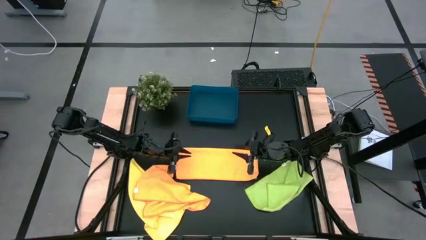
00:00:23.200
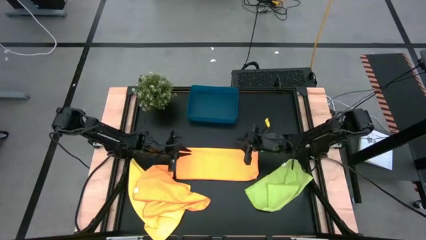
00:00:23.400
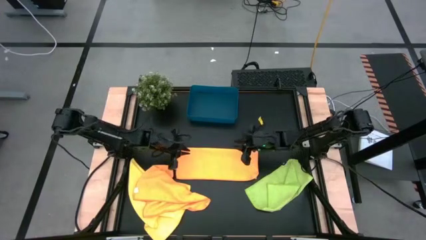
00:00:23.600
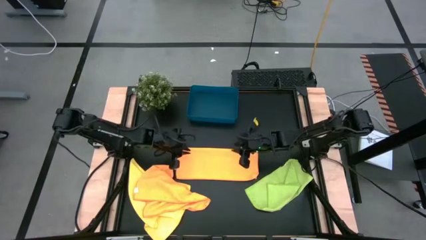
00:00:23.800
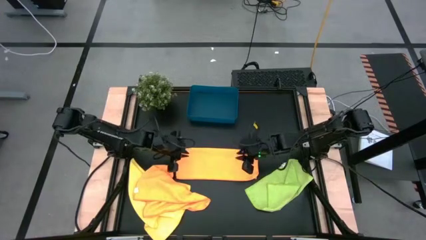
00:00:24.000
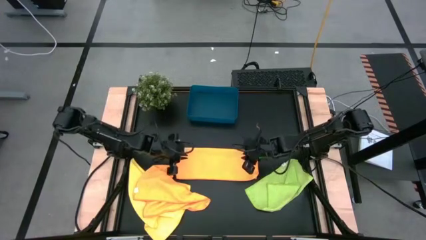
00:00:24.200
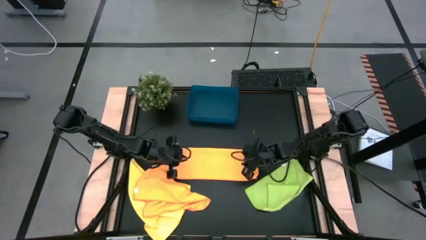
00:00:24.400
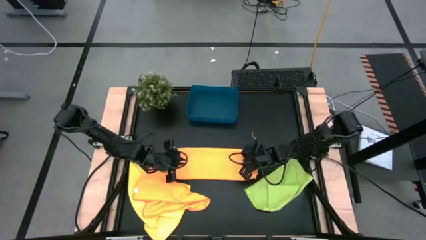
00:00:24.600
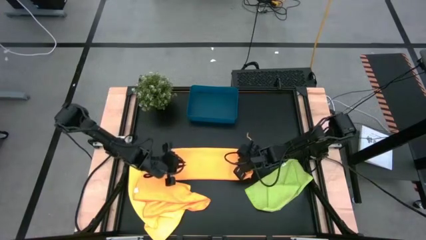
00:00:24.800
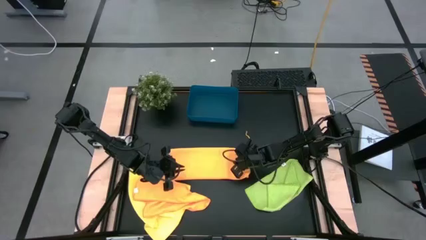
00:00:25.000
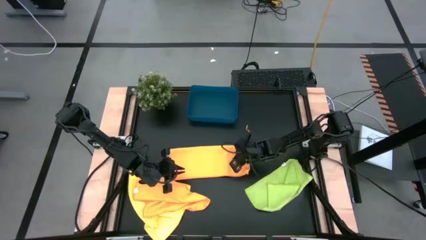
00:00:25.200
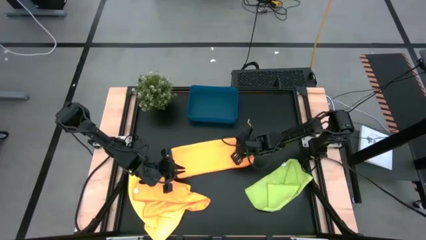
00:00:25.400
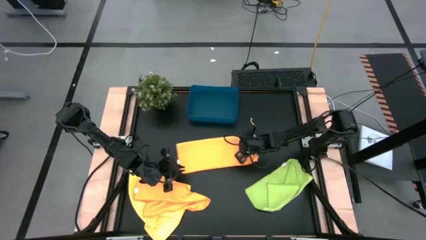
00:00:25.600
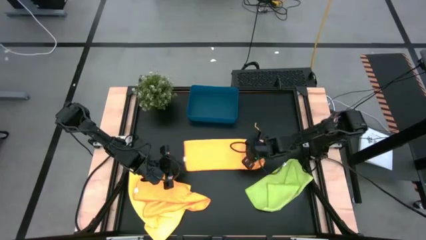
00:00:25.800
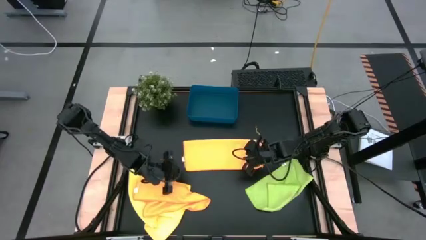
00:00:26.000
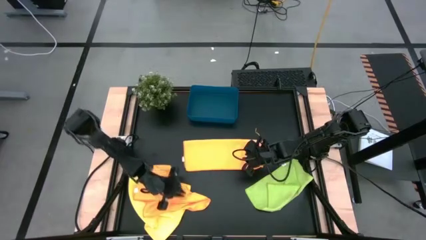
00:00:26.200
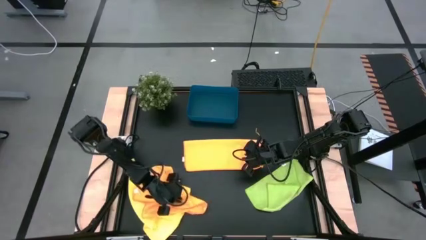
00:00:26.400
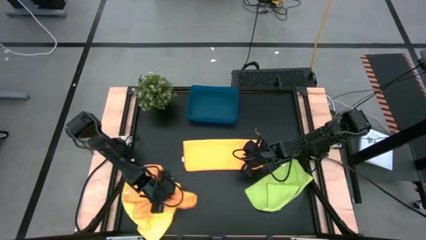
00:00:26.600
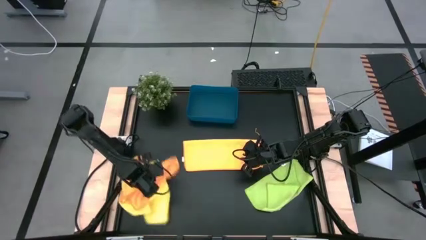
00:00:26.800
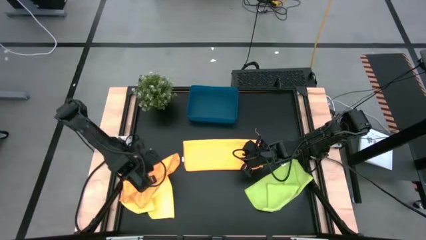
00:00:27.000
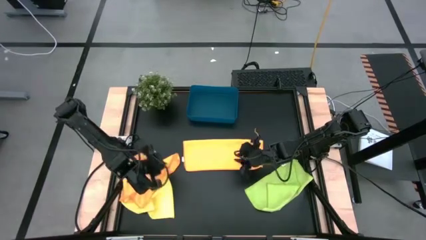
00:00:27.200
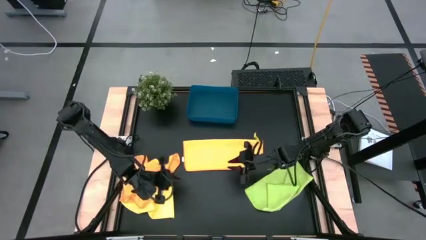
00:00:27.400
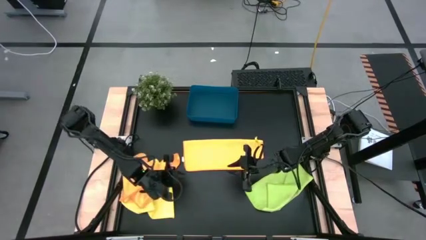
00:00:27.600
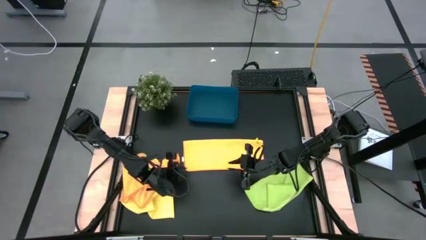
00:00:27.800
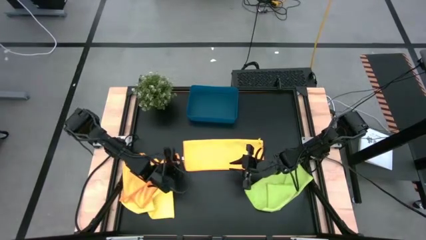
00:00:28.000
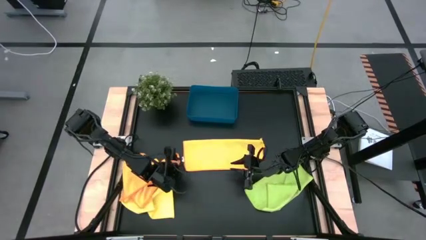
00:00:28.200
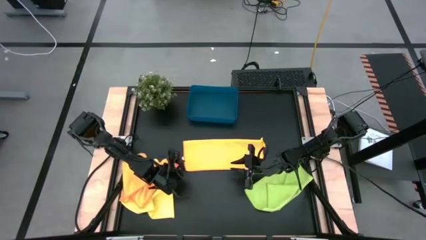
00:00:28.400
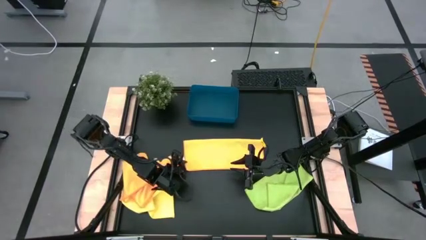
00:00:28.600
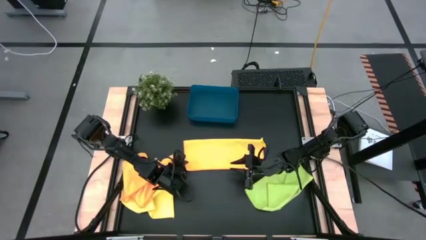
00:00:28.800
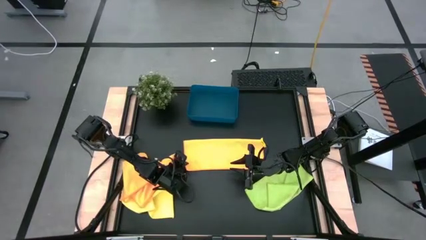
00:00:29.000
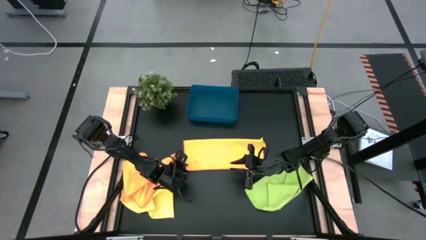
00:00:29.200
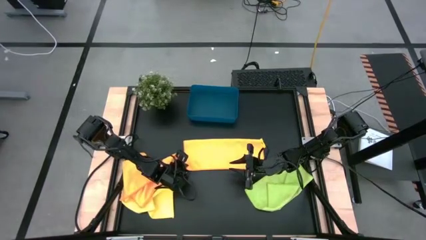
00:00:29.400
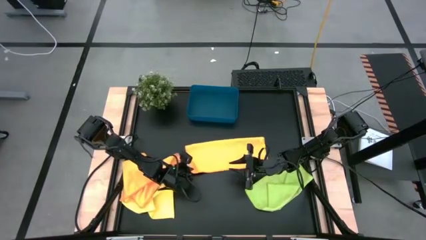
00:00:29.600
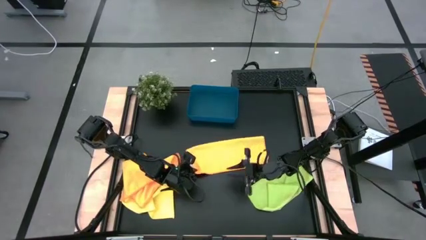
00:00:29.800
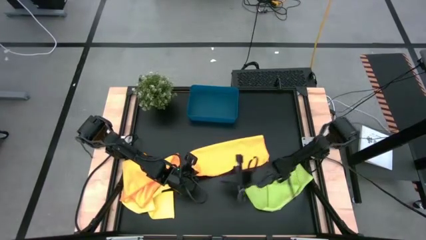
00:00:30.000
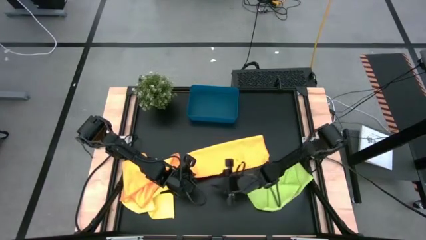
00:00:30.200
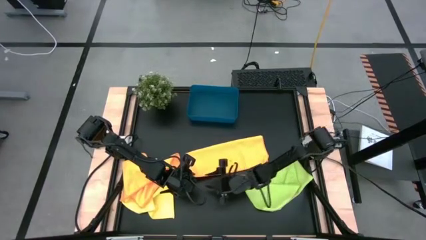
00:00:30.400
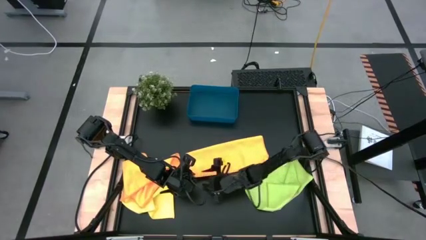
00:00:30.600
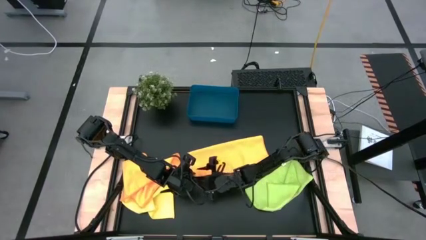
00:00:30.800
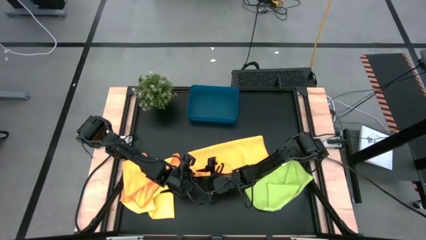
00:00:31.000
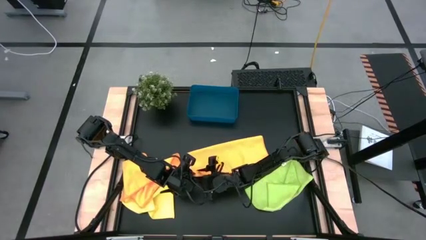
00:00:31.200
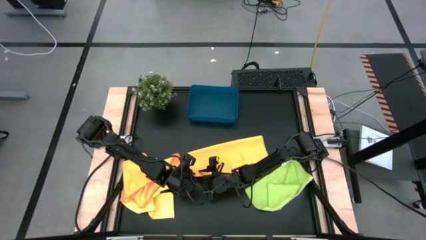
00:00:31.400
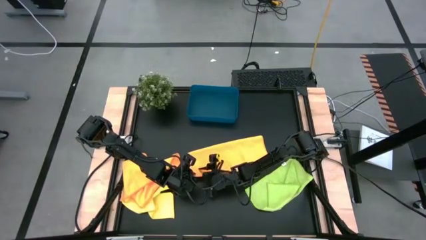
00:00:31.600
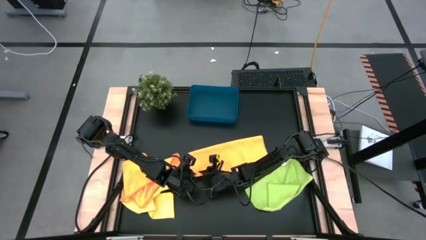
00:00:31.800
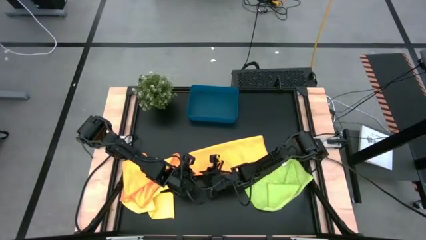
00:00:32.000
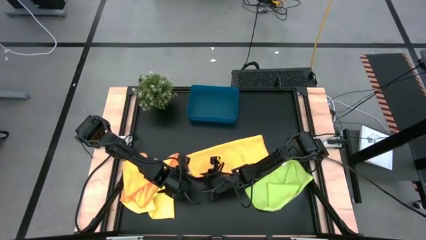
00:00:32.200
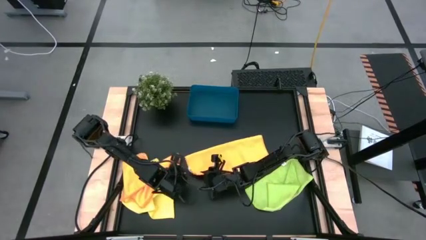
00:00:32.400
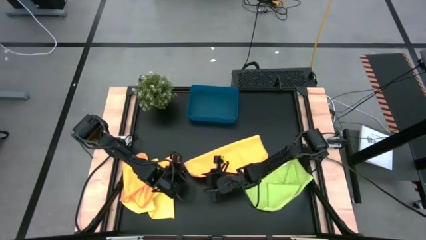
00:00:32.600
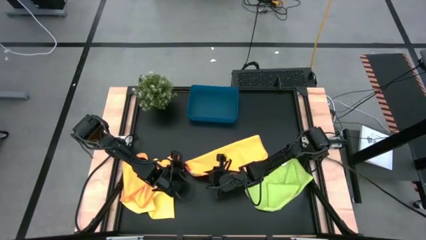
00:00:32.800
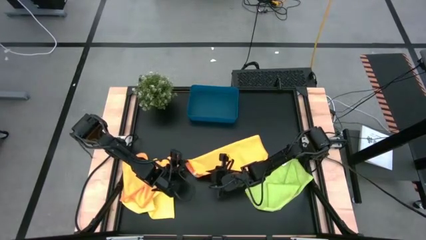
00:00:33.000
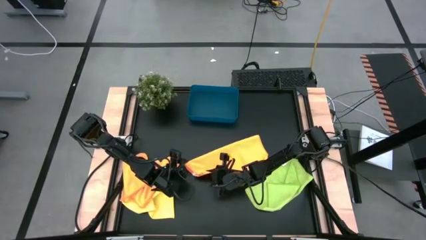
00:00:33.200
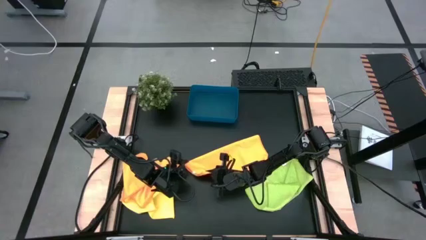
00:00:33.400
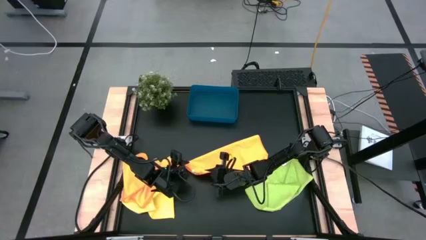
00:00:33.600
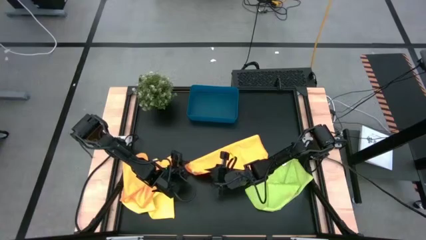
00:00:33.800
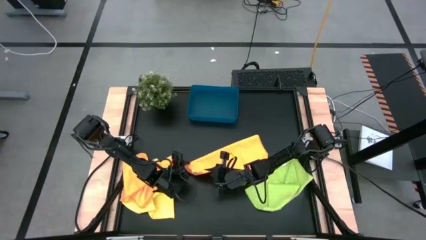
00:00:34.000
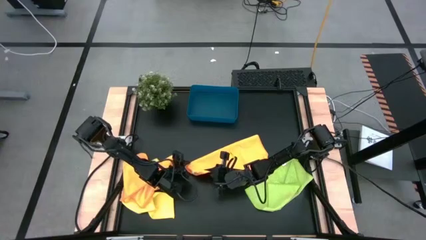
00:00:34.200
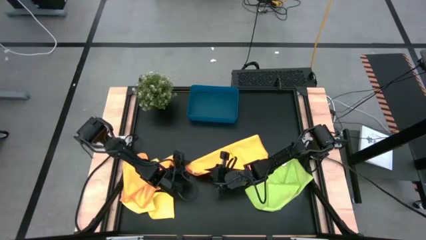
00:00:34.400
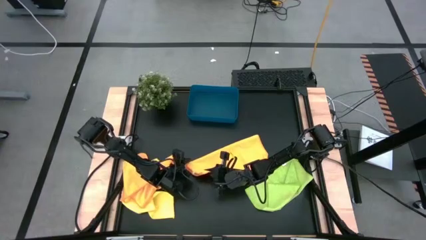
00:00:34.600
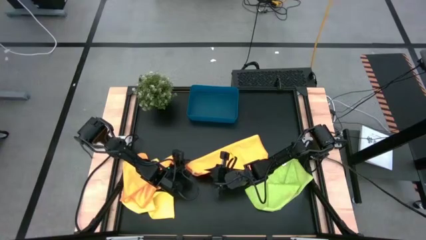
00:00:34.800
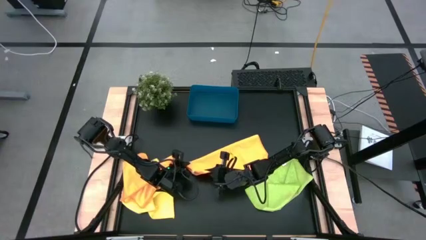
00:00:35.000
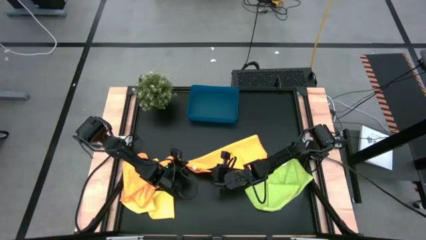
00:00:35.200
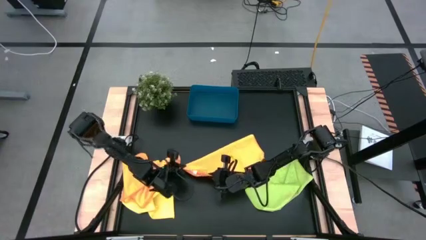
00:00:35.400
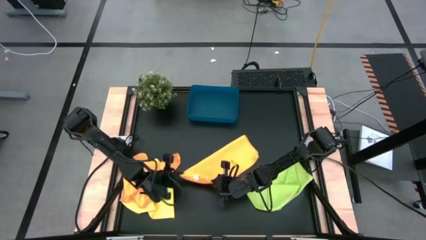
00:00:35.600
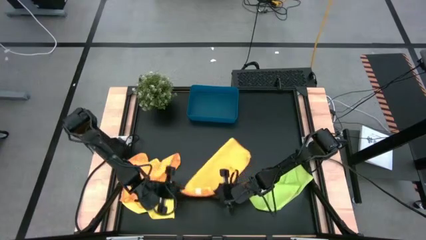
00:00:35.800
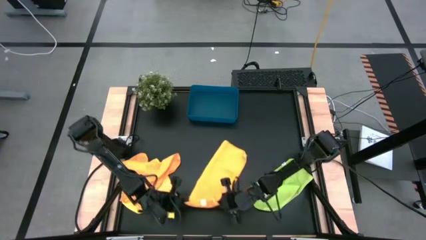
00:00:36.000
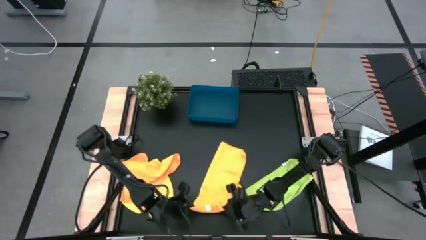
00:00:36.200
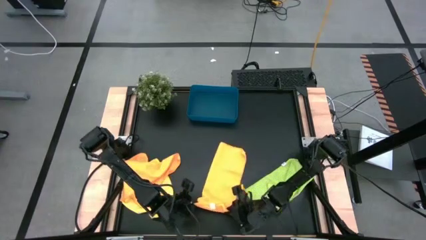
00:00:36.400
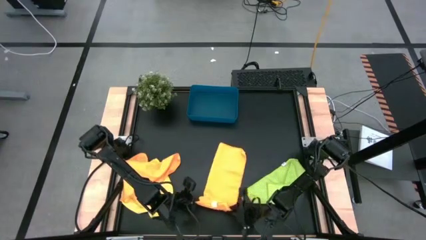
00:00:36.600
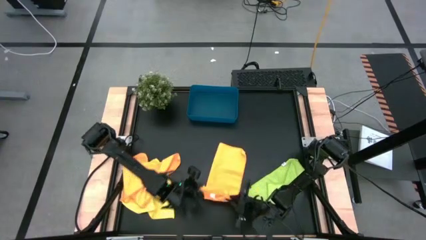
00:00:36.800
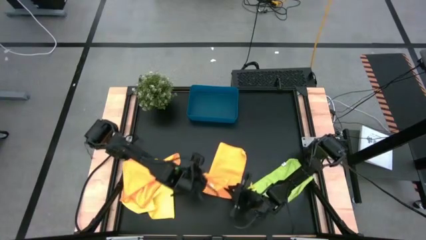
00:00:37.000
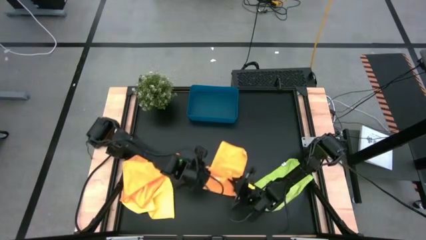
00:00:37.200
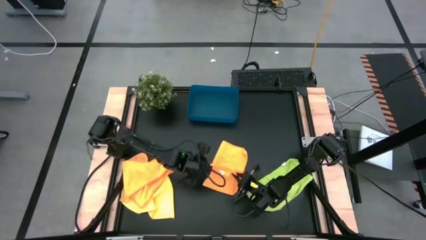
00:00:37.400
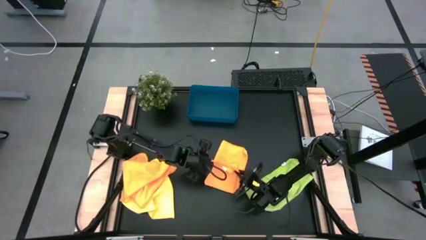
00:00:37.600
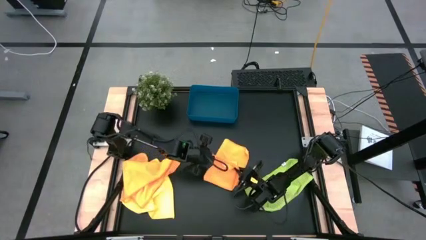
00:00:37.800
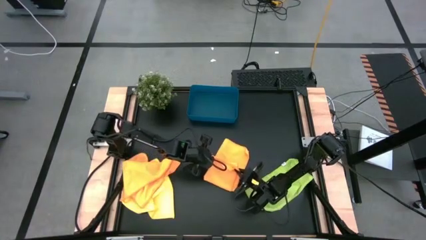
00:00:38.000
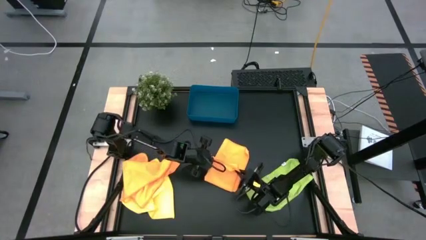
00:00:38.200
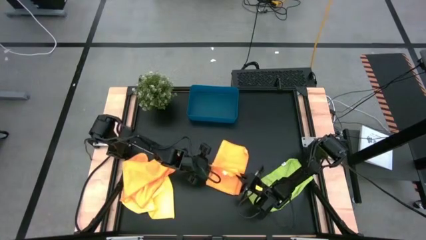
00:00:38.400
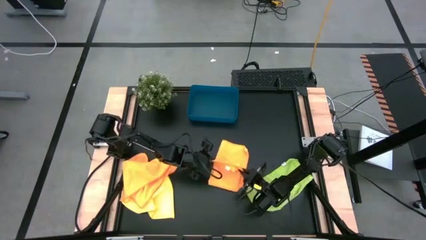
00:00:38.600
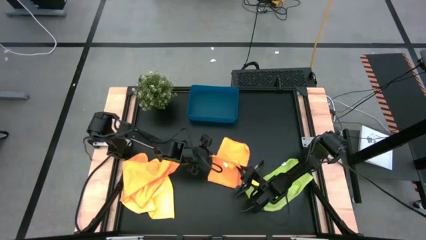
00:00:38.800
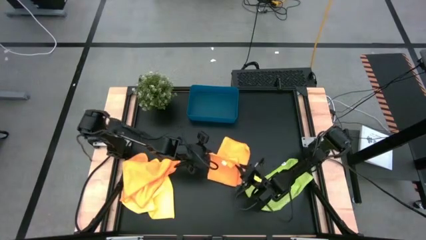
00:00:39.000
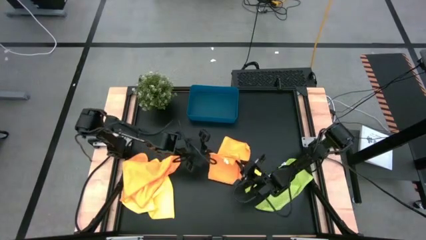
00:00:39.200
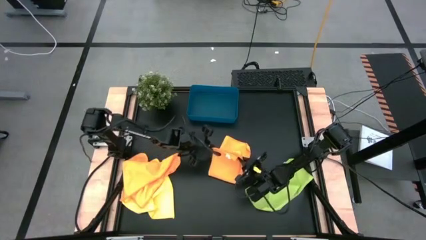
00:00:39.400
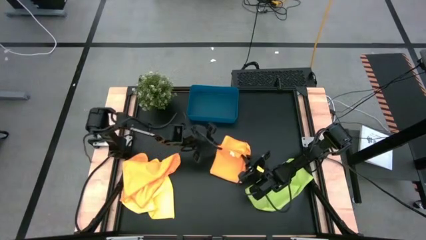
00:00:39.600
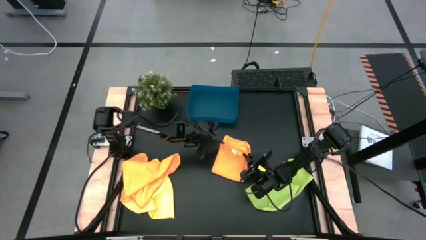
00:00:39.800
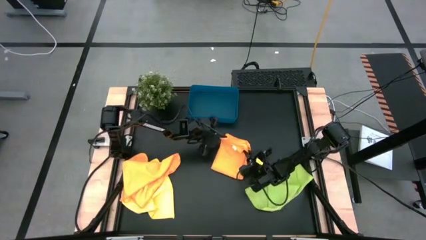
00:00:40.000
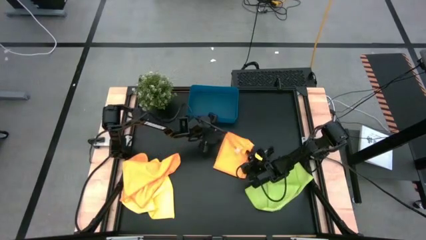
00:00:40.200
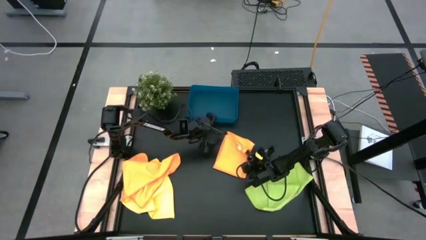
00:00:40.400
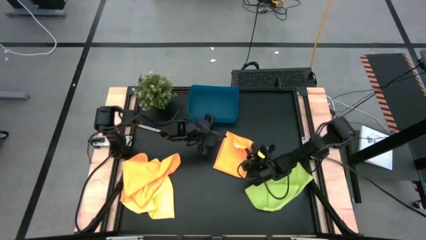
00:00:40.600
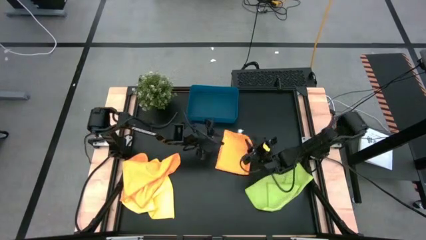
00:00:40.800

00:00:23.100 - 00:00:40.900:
Task: Fold microfiber towels
Fold the right orange microfiber towel
